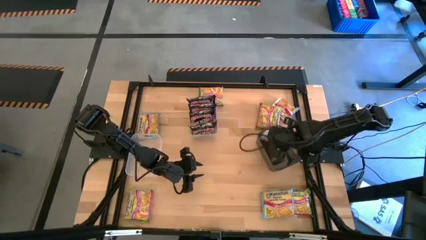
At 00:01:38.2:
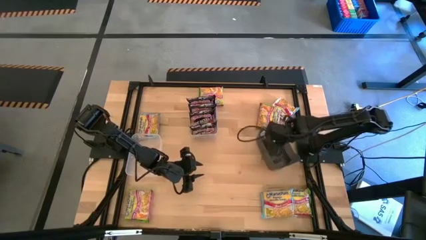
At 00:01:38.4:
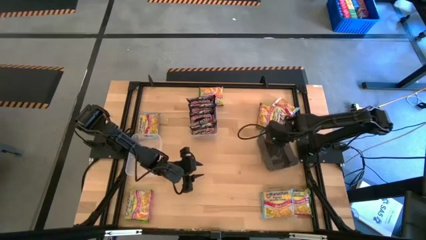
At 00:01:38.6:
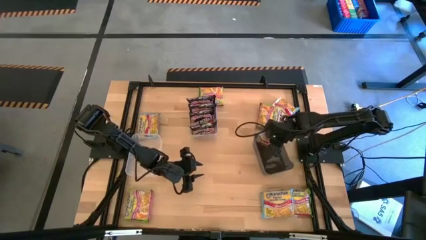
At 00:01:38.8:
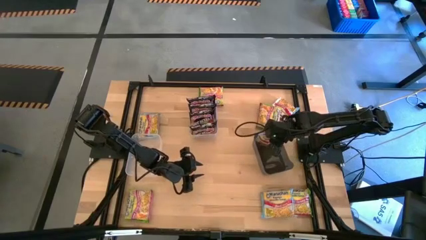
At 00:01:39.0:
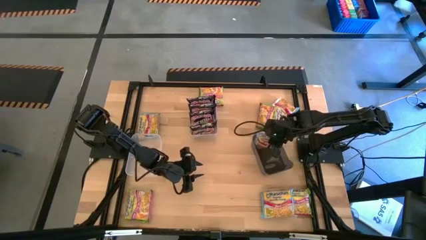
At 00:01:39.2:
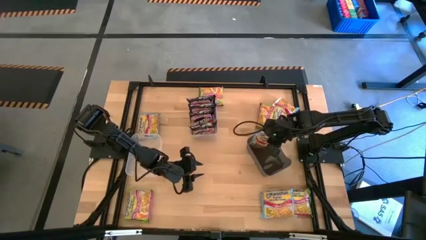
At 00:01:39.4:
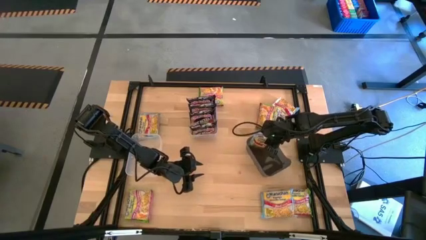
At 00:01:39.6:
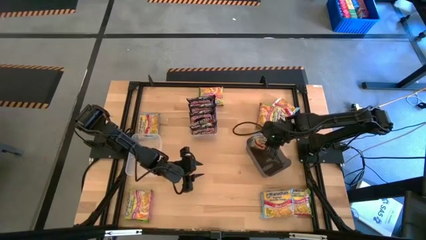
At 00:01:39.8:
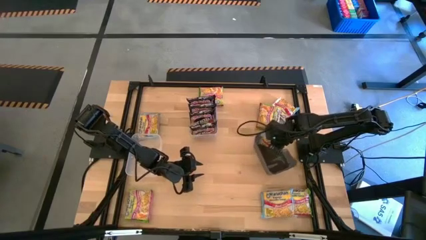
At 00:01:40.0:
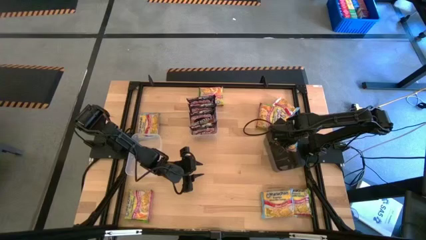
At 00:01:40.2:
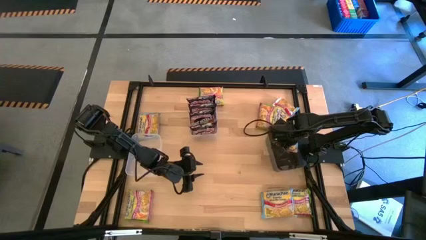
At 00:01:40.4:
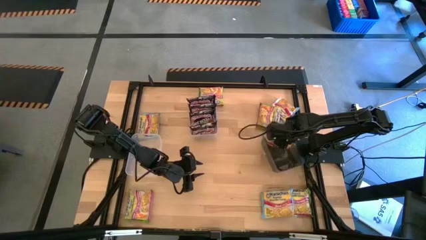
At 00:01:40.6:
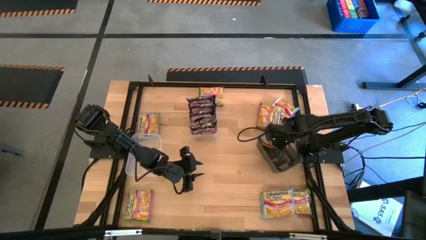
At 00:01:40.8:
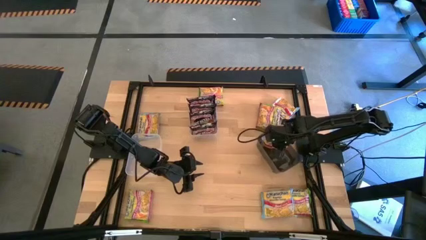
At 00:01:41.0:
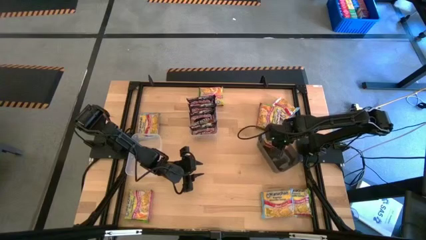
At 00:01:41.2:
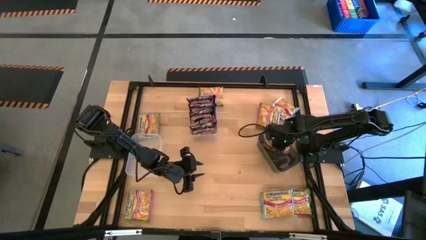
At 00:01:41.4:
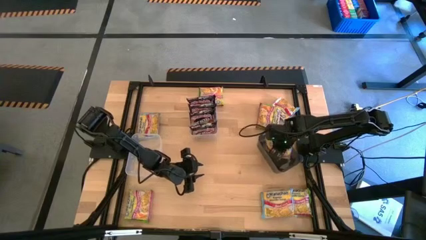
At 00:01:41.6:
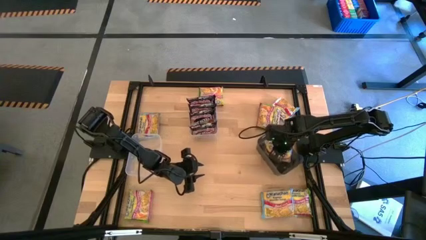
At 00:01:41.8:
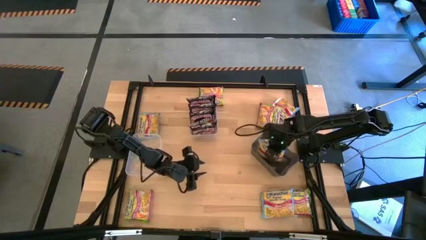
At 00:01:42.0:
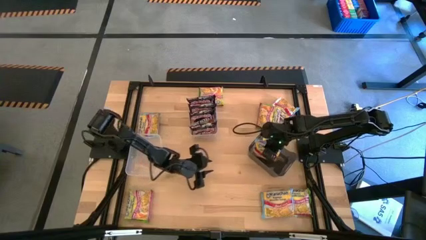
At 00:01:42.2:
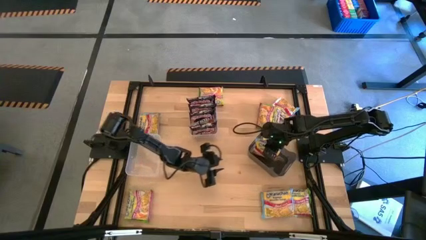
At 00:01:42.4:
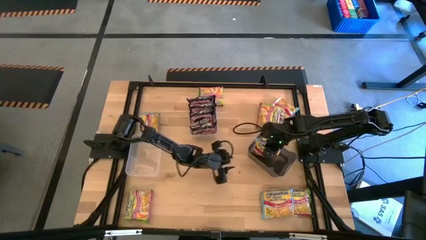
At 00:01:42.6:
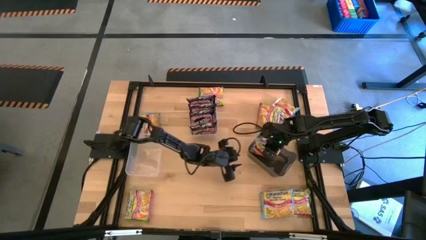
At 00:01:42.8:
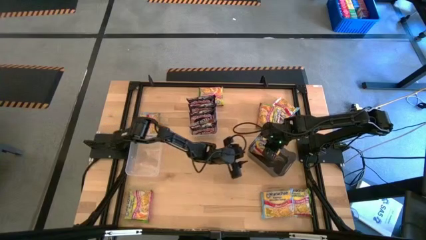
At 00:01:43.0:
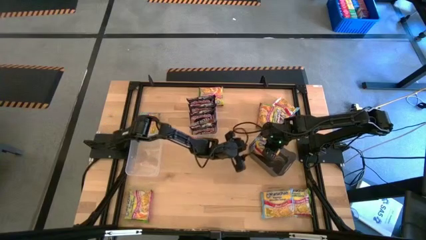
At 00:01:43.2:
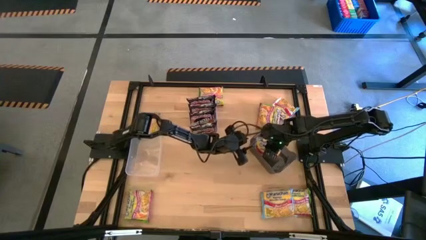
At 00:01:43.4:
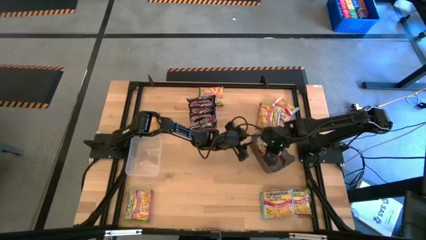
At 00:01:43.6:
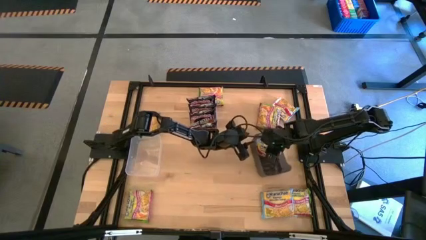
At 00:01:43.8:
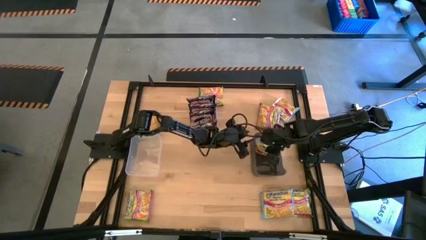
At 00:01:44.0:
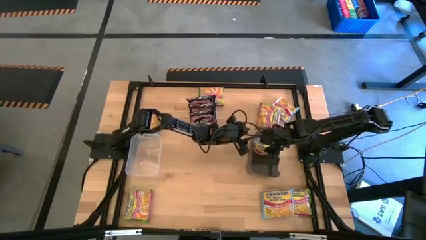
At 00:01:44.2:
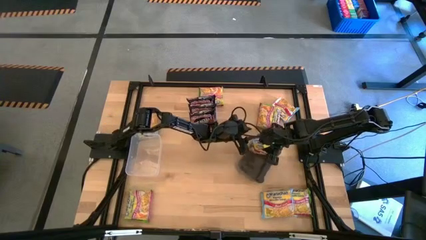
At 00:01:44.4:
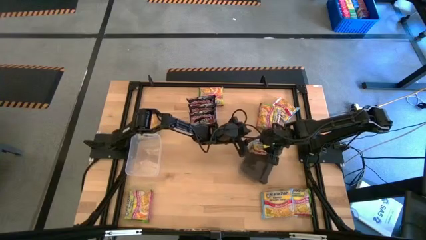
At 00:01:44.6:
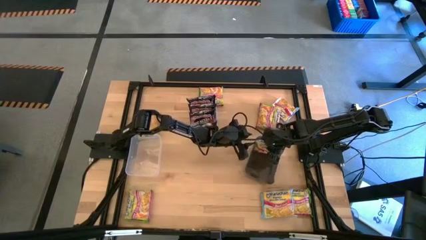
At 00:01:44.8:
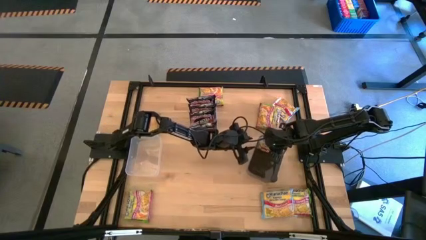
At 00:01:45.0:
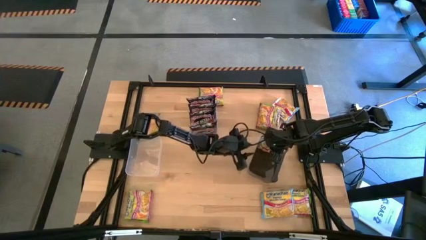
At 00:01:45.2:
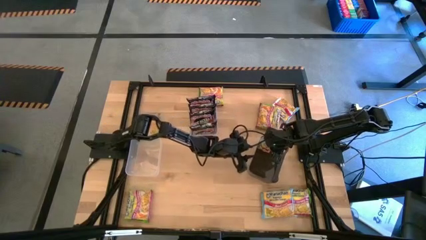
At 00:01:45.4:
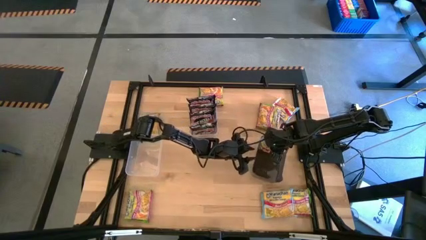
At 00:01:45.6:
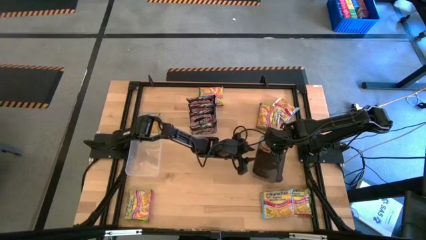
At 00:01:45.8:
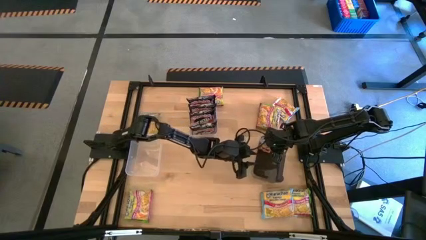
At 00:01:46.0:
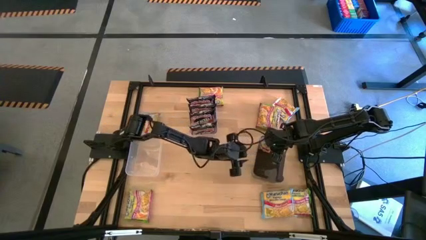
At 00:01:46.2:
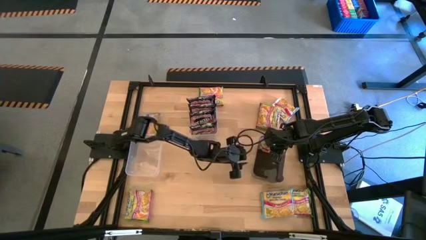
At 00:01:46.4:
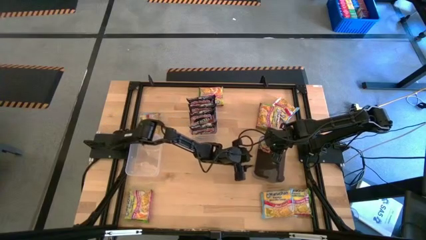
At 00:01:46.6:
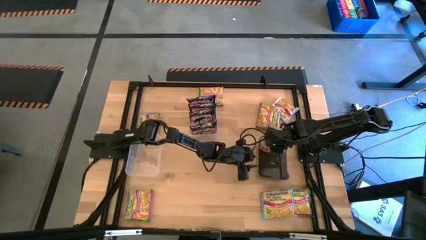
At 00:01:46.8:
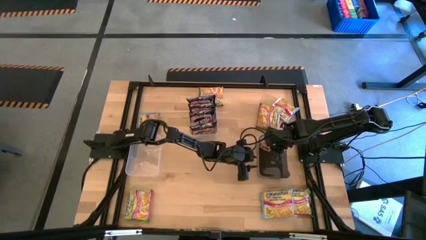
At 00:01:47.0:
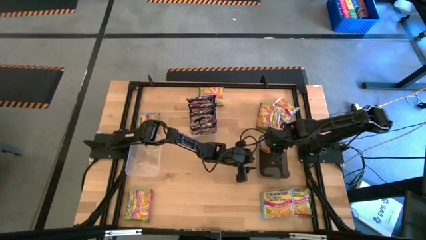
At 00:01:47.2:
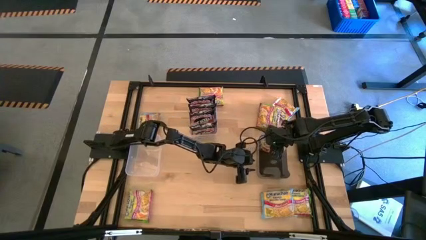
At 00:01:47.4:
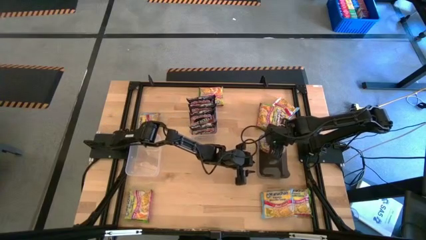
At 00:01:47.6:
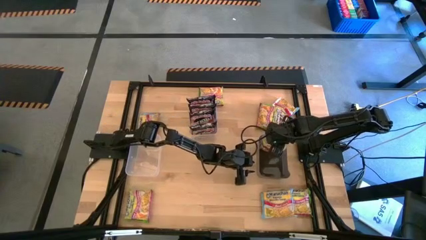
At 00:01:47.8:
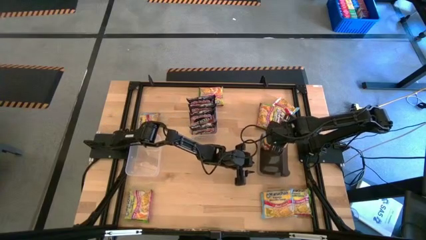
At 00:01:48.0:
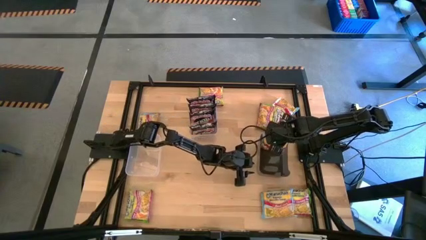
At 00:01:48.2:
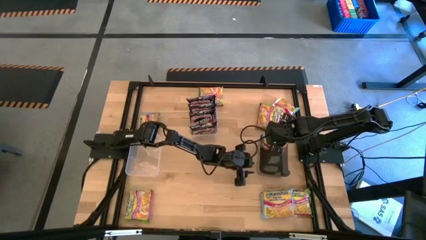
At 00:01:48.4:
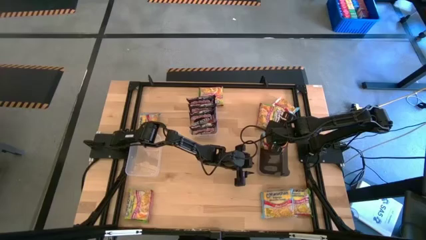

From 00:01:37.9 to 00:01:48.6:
Task: Sort Maruchan noodles
Put the blue noodle pack into the black bin

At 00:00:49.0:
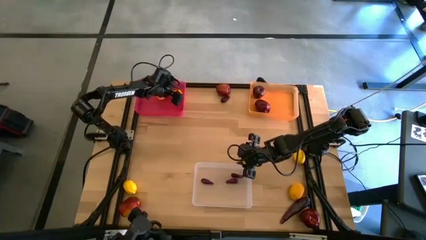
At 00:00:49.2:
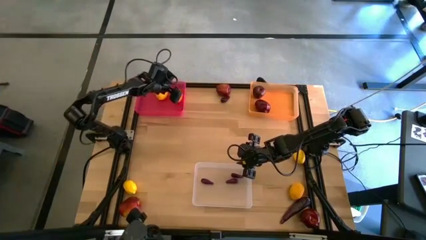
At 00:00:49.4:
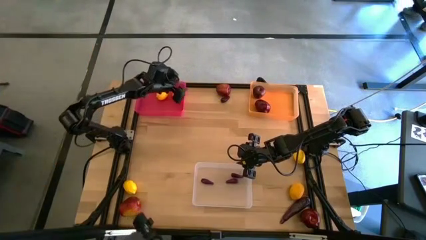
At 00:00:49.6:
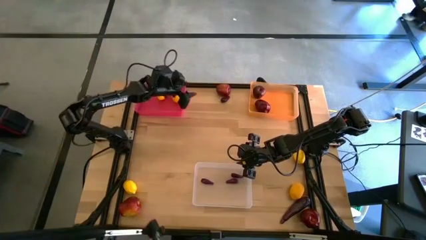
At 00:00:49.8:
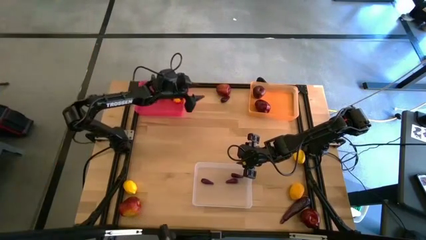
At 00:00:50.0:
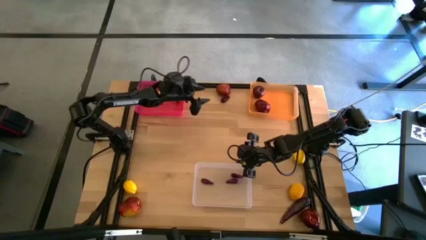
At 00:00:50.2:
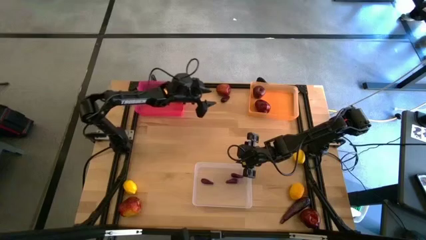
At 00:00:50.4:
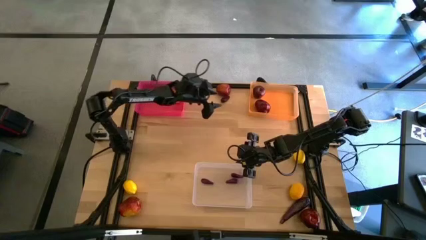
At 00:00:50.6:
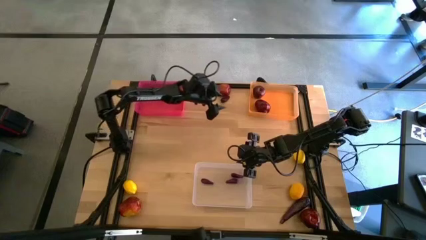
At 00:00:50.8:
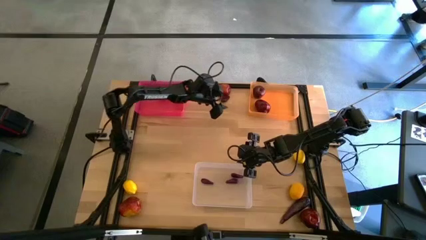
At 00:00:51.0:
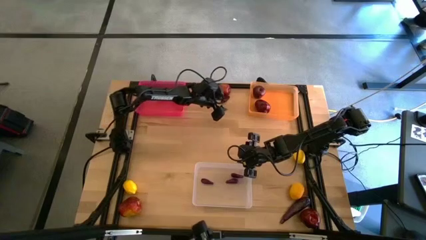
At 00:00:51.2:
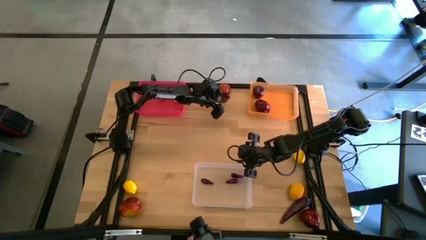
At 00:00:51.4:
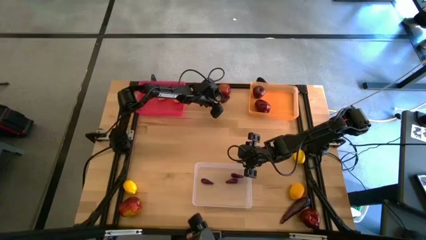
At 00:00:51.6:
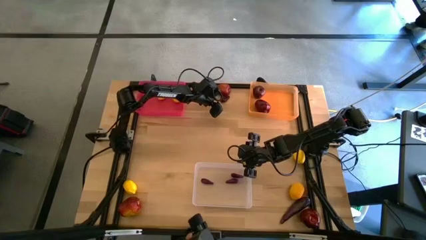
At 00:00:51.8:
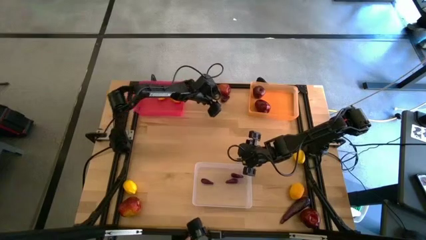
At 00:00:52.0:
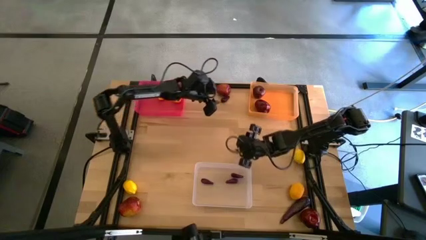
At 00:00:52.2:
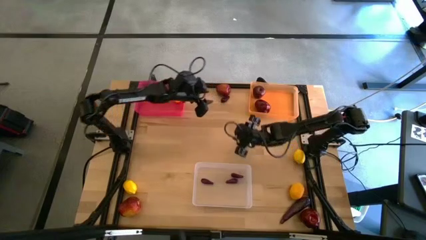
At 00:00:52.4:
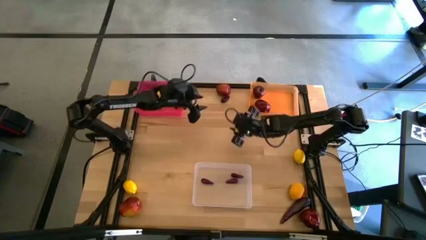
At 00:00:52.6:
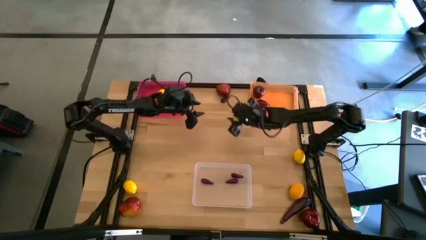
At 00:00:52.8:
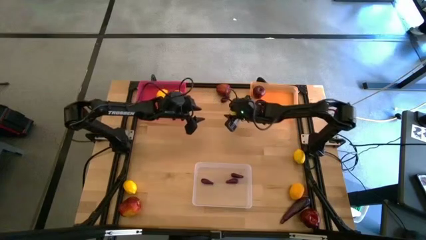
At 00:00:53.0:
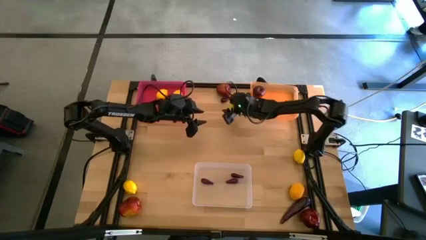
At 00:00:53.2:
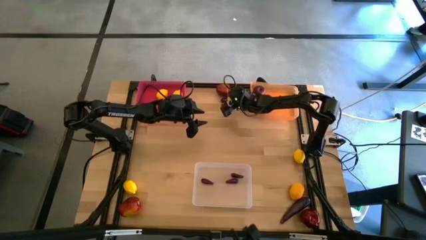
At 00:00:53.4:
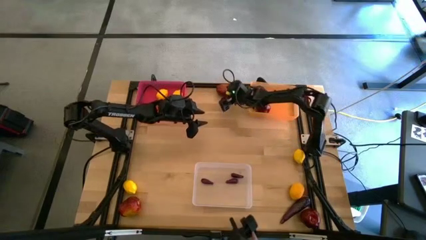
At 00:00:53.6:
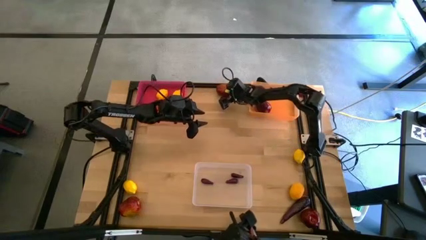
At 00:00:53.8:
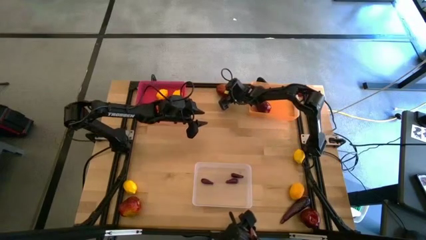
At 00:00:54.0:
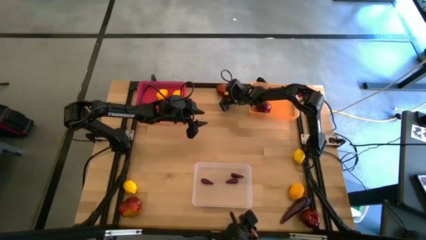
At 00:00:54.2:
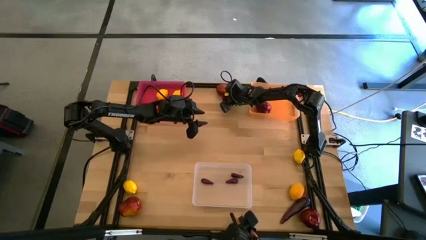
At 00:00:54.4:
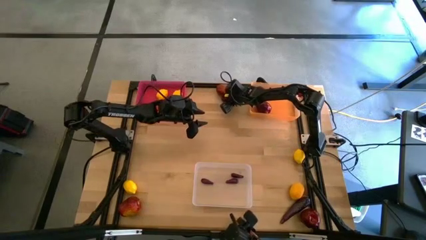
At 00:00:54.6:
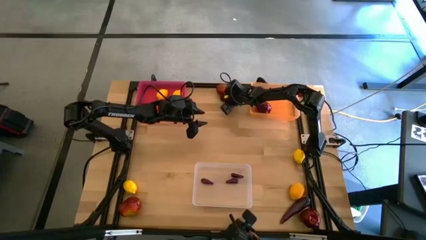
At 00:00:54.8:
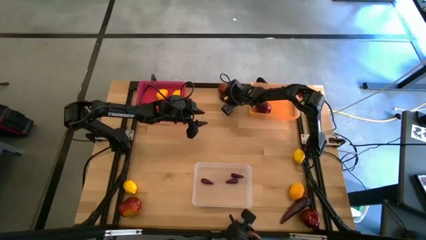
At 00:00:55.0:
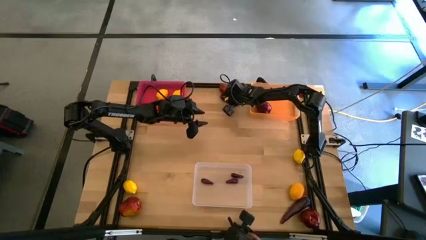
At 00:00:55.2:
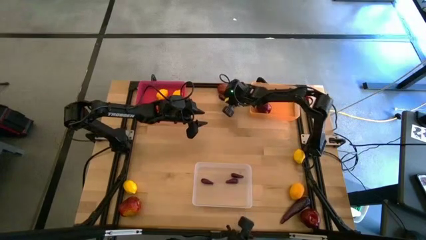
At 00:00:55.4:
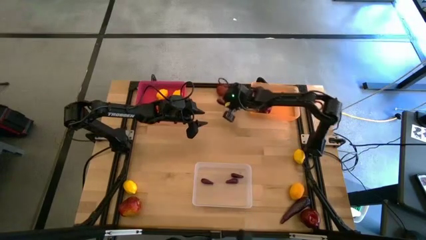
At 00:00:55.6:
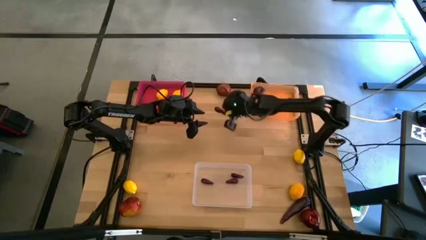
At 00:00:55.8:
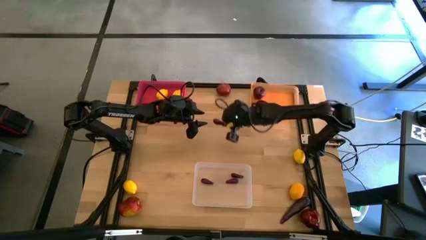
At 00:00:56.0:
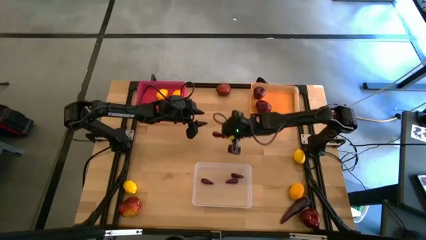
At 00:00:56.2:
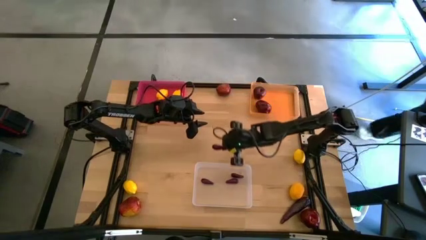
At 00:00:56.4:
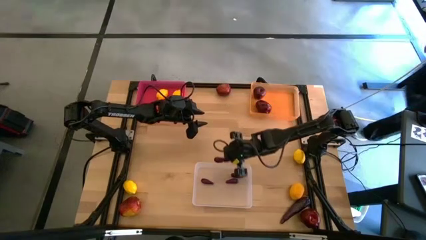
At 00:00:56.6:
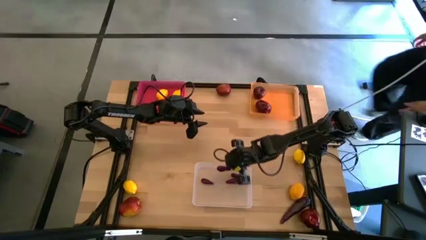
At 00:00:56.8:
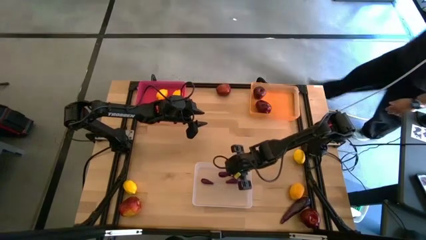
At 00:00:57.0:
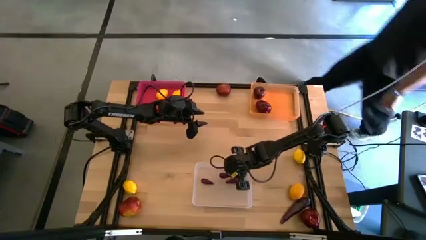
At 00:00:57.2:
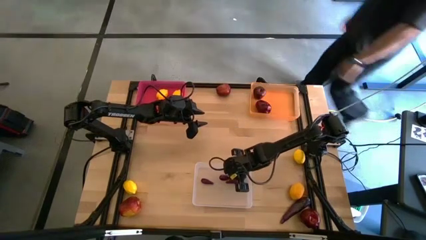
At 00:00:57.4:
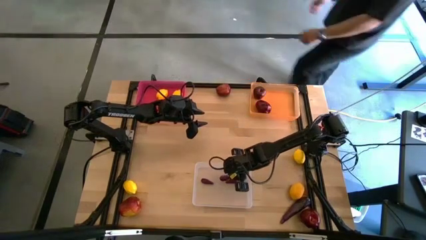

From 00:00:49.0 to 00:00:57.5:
Task: Sort produce into baskets
Put the eggplant into the transparent bin
